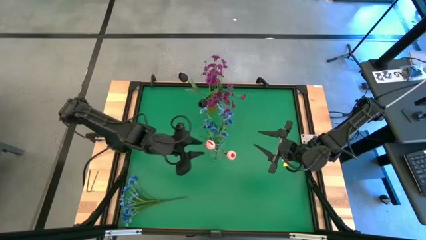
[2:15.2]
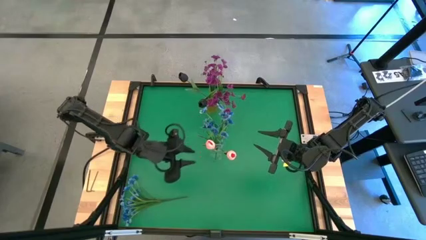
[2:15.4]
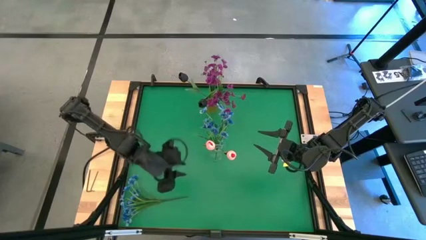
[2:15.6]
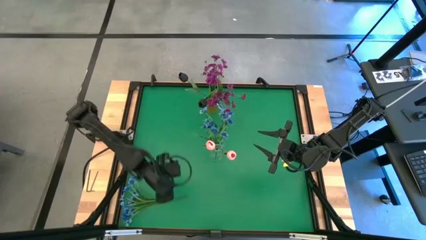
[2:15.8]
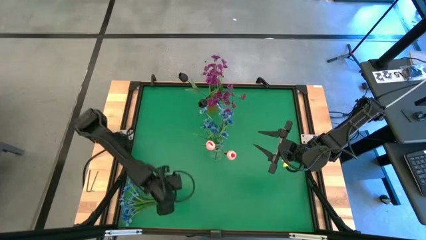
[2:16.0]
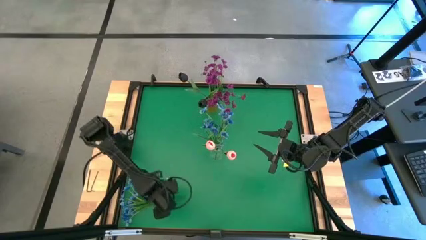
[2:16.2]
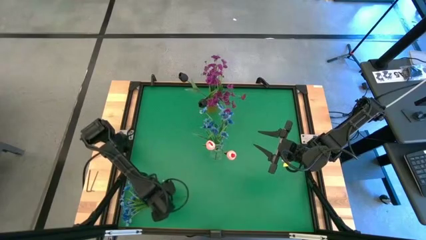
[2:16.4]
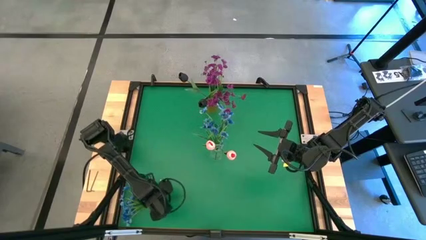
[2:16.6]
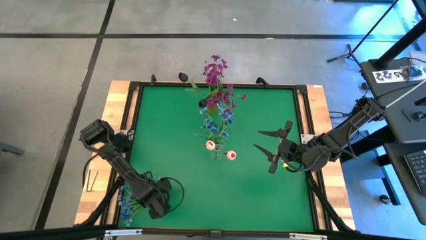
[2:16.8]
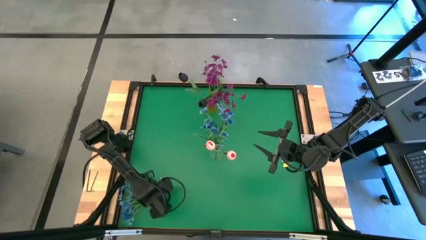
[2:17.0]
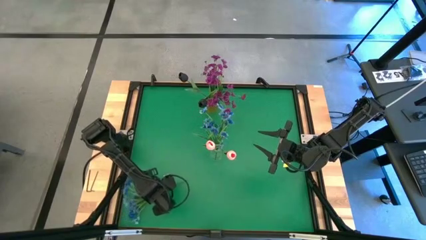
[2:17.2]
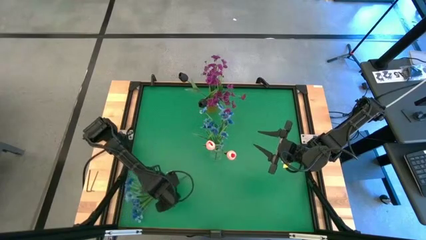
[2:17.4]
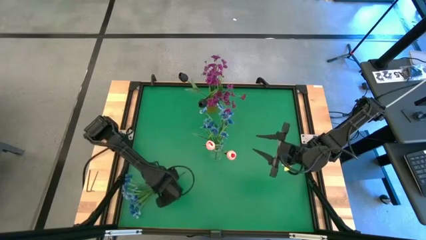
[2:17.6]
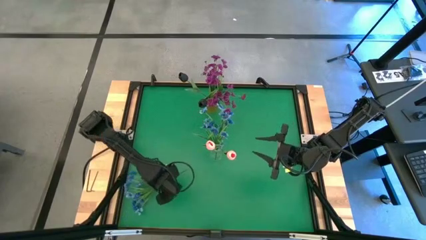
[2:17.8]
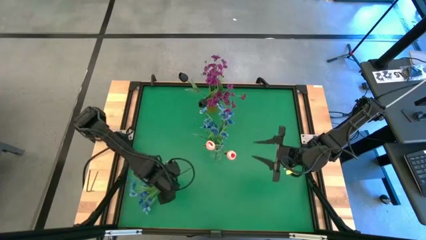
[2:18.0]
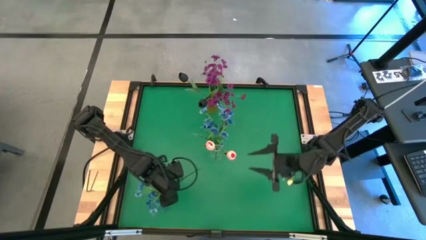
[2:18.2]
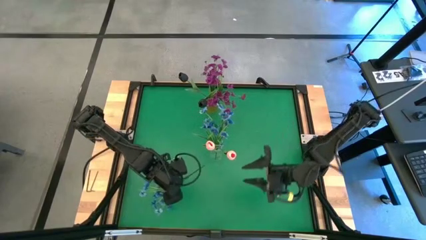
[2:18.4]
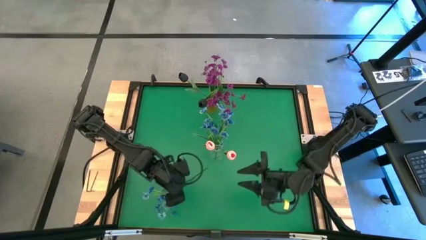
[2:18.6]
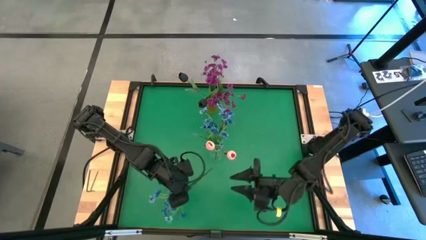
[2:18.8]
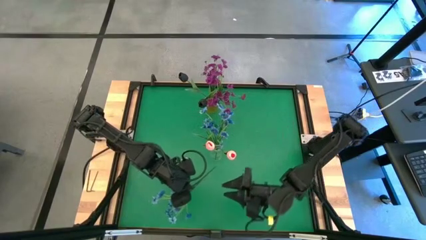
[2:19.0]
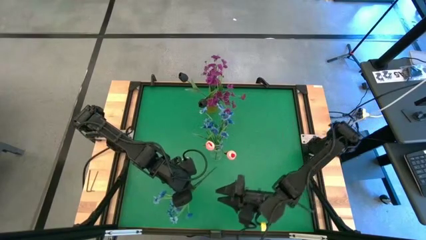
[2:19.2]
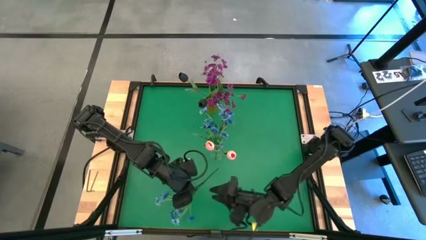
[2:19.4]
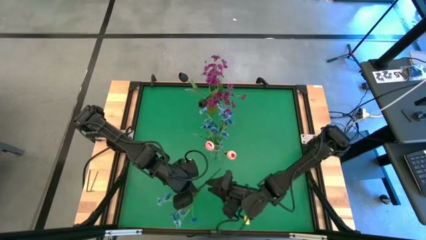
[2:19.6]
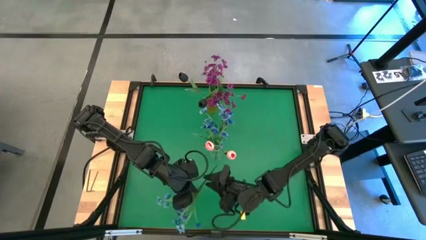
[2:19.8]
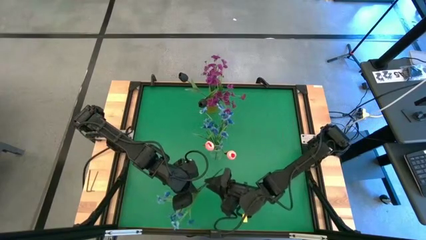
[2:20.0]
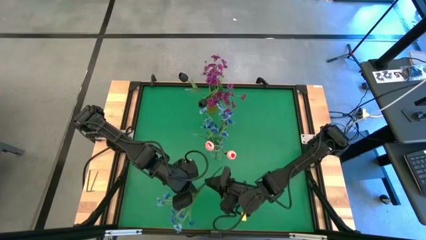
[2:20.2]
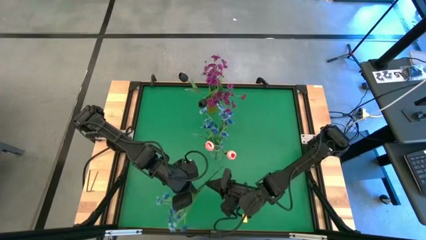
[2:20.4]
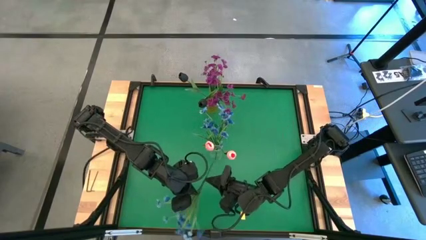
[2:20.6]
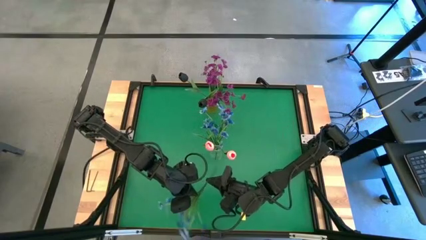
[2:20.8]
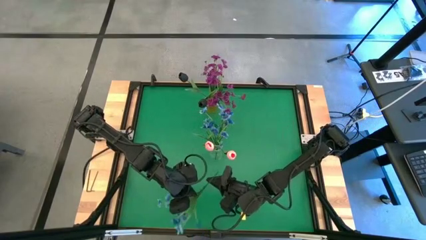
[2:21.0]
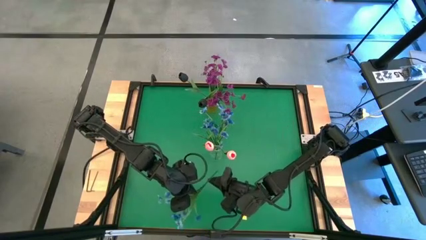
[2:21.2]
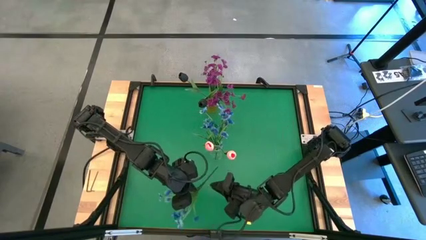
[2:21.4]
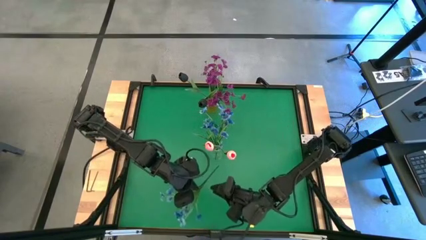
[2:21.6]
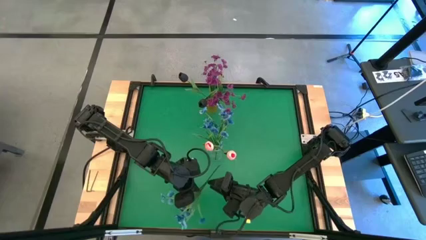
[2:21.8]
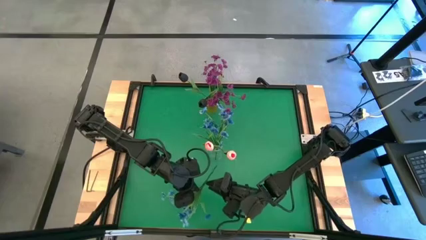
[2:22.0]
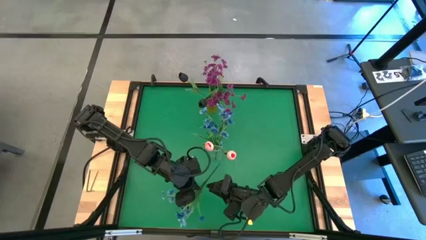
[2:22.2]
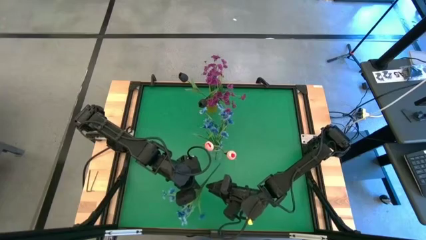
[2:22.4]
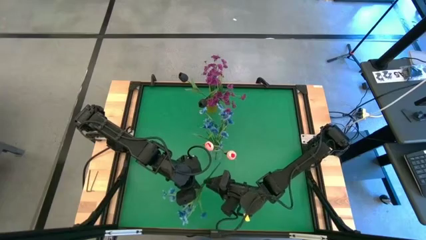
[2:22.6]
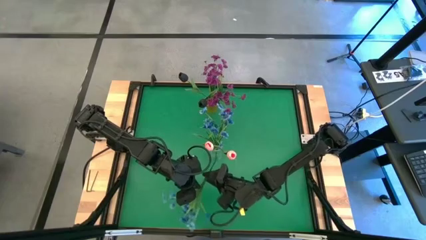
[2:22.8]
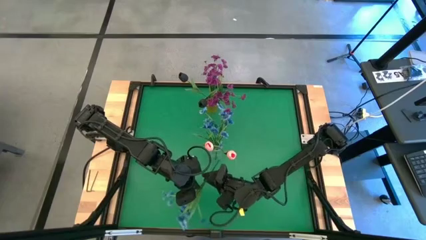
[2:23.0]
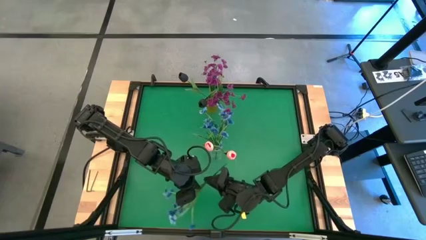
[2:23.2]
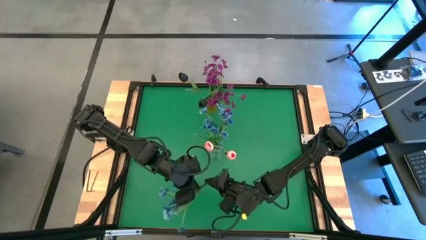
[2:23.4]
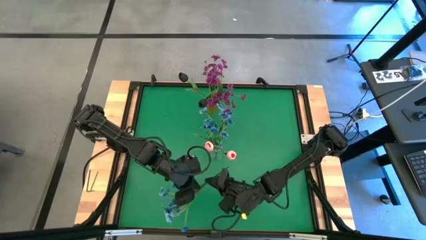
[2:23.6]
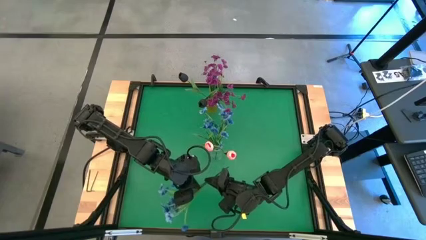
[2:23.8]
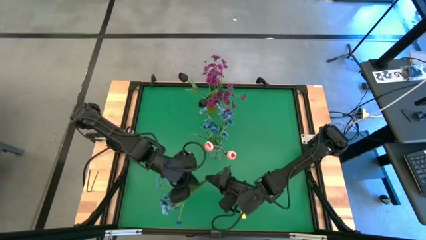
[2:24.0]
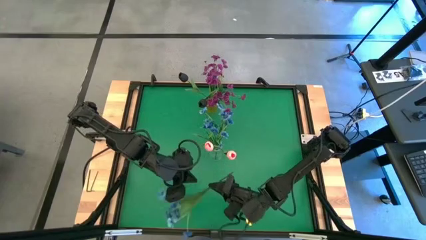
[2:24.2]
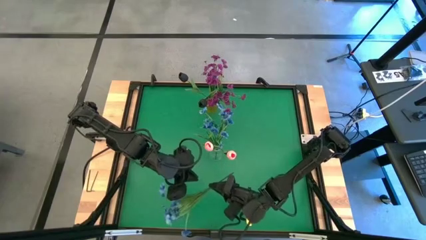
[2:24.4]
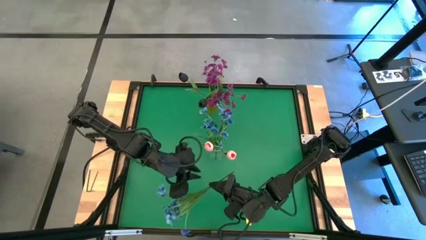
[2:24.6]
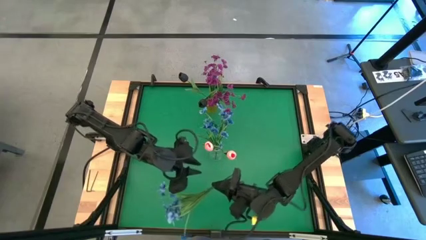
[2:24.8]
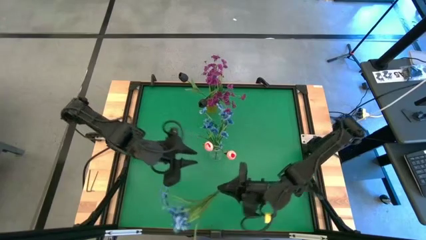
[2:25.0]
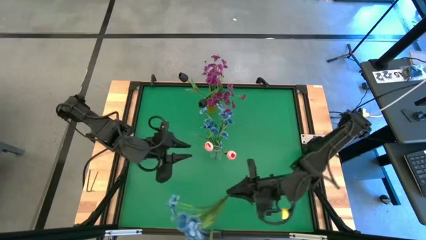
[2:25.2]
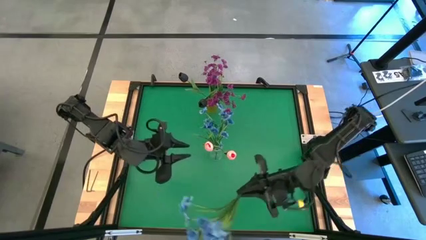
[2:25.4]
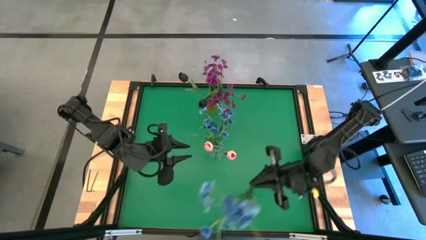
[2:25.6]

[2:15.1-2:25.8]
Task: Sort flowers into vase by color
Put the blue flowers into the transparent vase

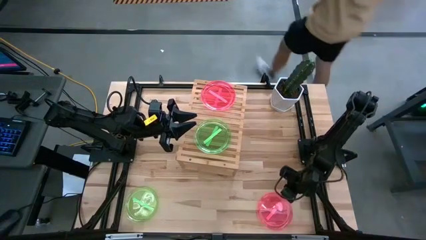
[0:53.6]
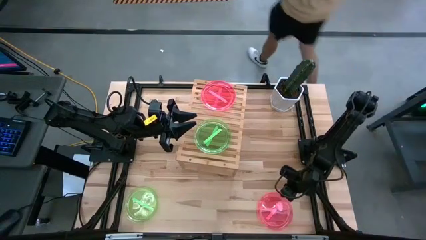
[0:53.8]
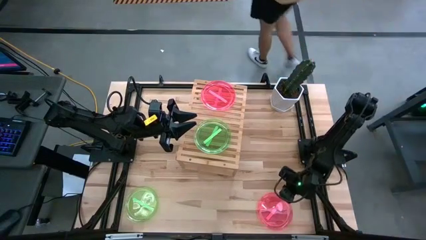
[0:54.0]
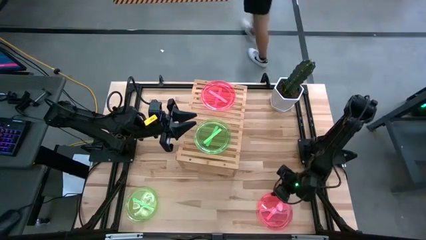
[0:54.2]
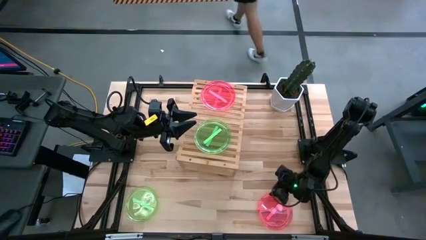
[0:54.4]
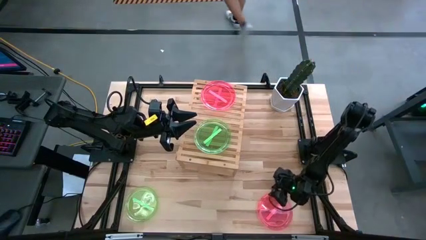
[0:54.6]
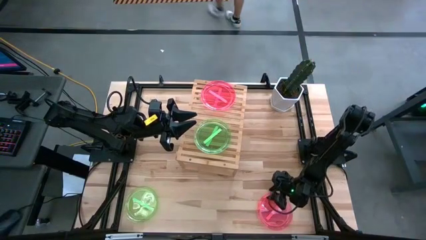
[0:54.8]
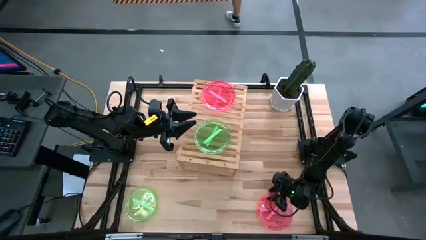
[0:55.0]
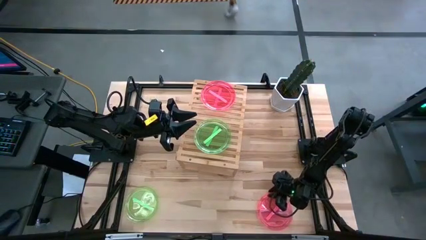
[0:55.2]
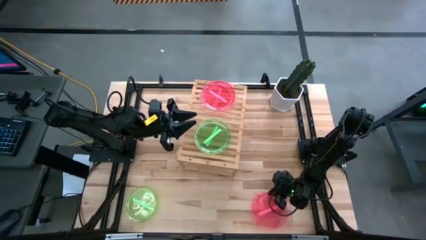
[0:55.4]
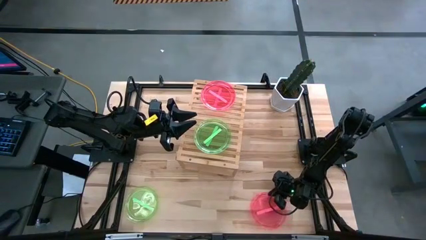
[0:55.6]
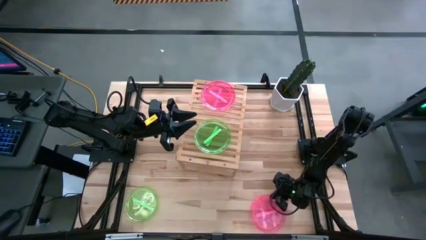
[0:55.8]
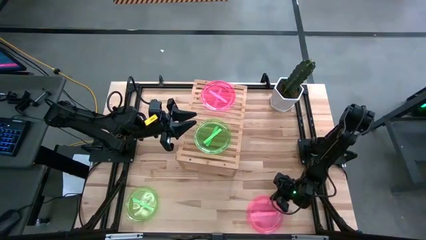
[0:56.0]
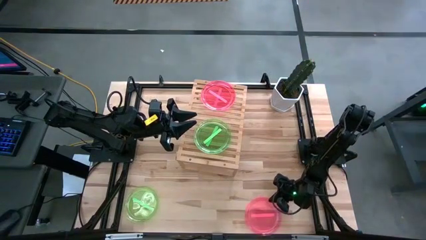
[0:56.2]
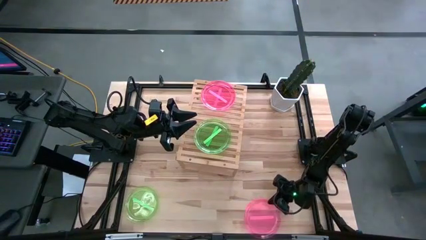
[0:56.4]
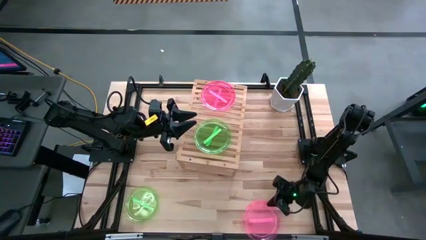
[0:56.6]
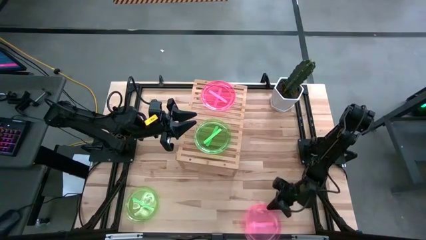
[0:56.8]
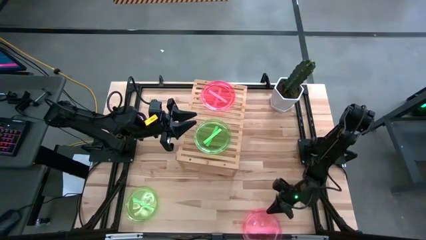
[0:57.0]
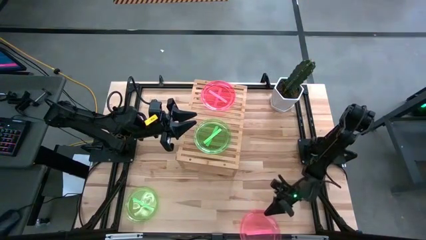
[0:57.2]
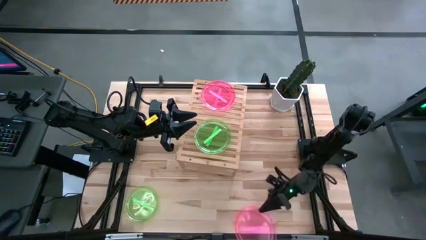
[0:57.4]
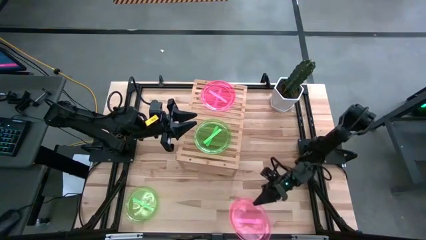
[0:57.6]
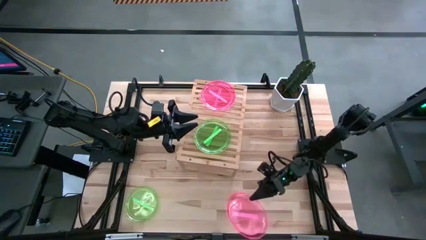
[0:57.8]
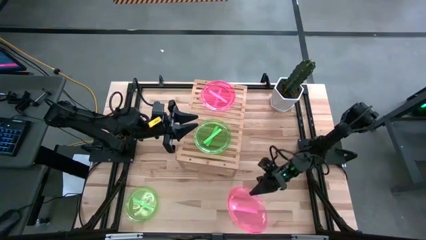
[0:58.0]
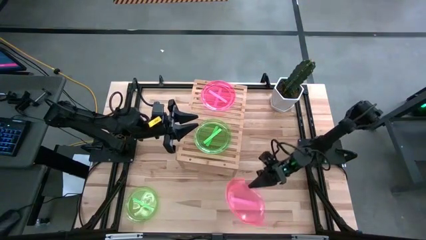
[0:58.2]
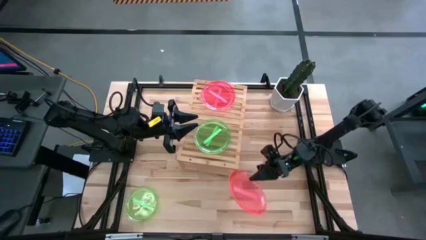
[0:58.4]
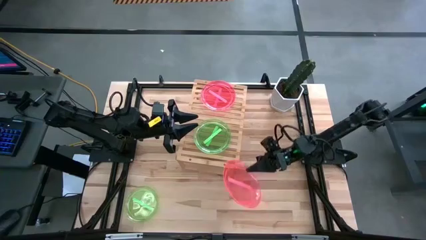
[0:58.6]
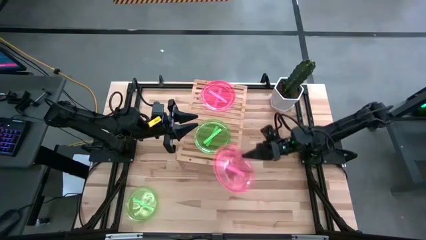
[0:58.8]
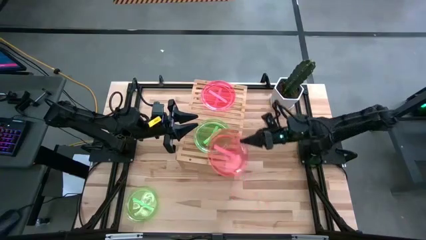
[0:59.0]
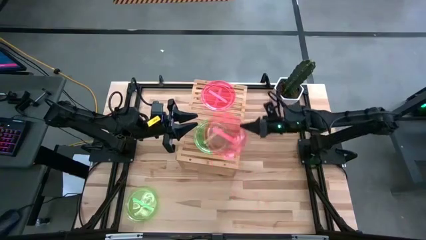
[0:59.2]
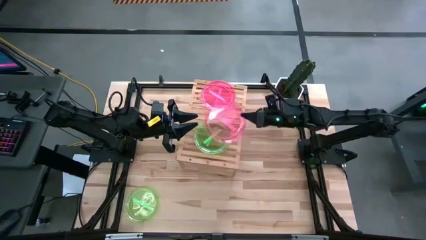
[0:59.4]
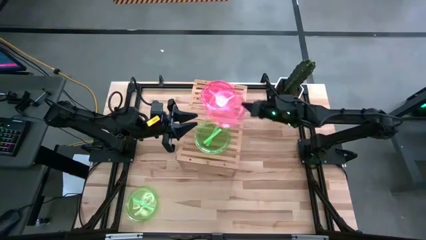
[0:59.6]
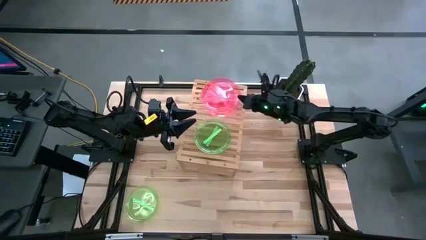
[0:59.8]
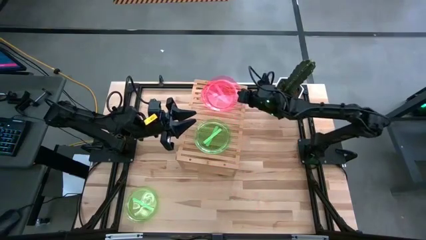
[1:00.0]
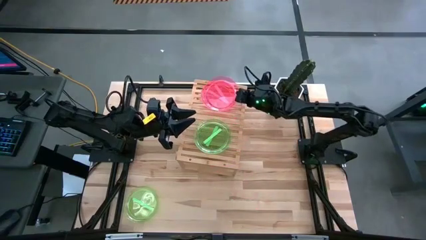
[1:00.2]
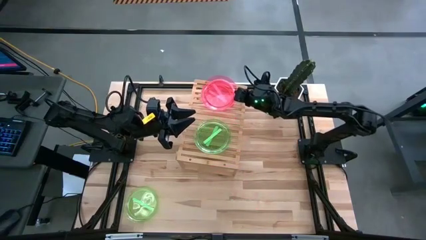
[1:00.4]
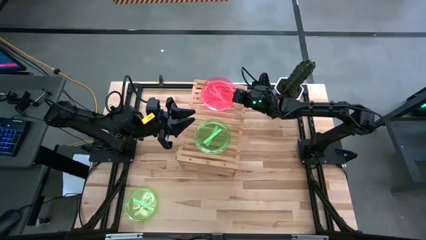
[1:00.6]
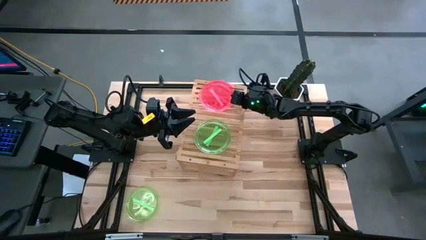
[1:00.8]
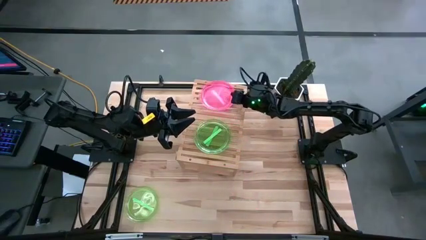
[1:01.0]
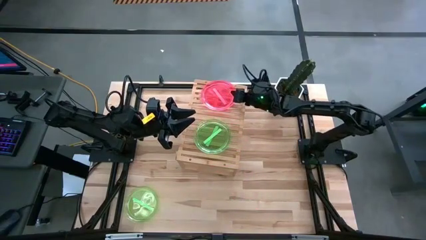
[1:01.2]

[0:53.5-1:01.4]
Task: Place and stack plates onto a shelf
Stack the pink transparent plate on top of the other pink transparent plates on the shelf
